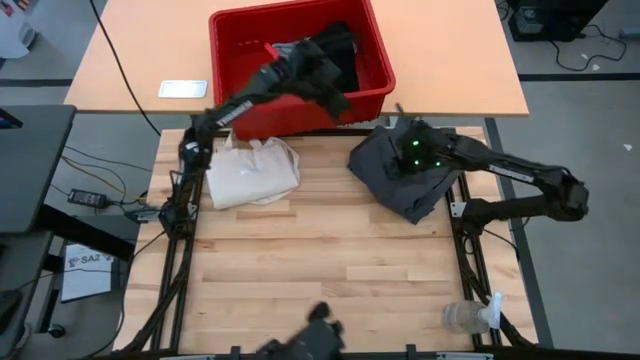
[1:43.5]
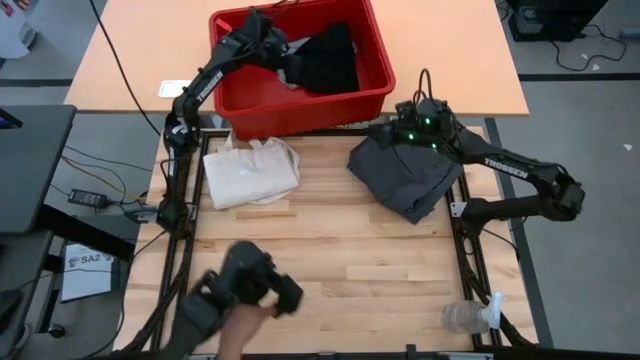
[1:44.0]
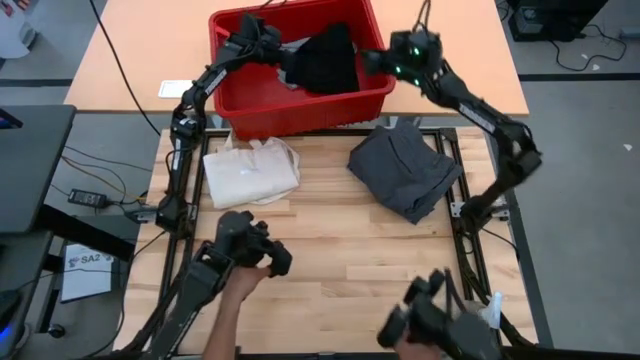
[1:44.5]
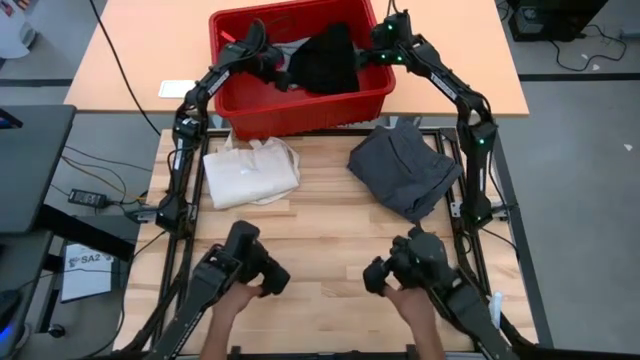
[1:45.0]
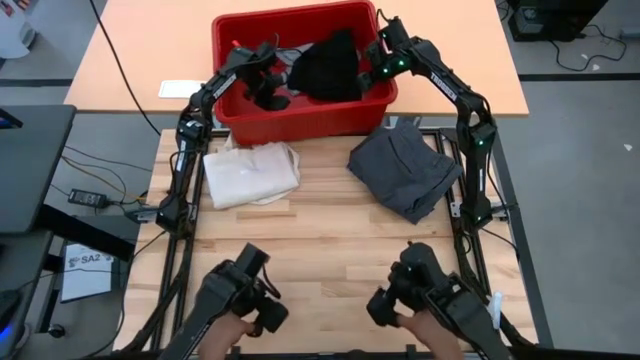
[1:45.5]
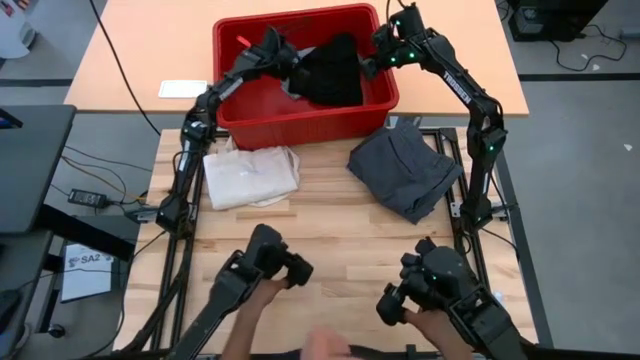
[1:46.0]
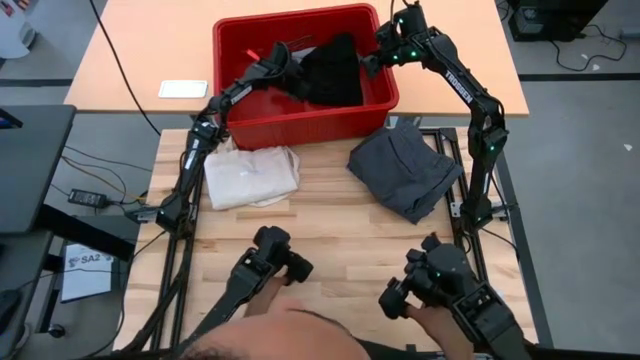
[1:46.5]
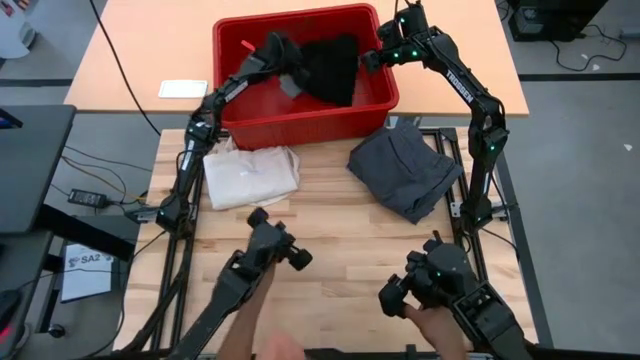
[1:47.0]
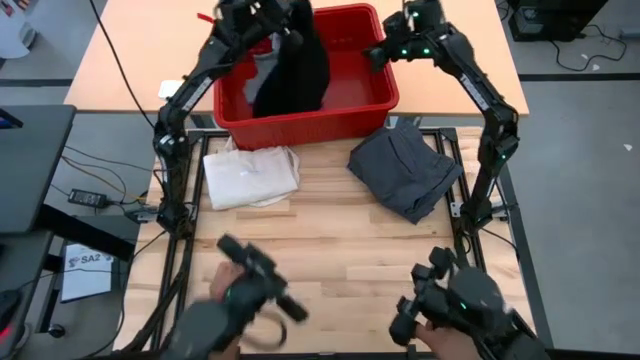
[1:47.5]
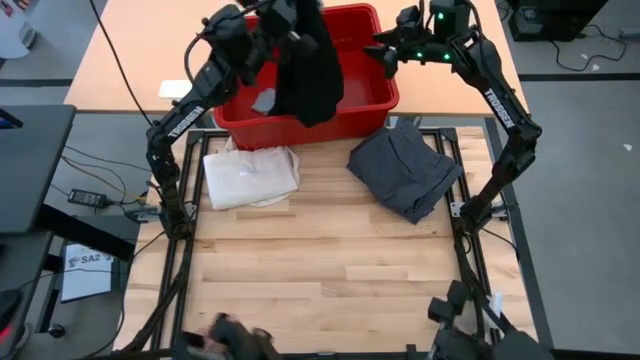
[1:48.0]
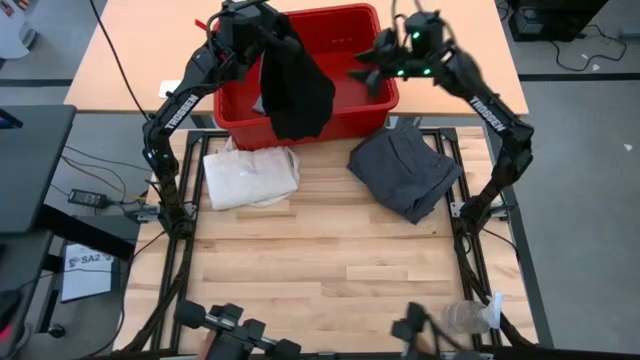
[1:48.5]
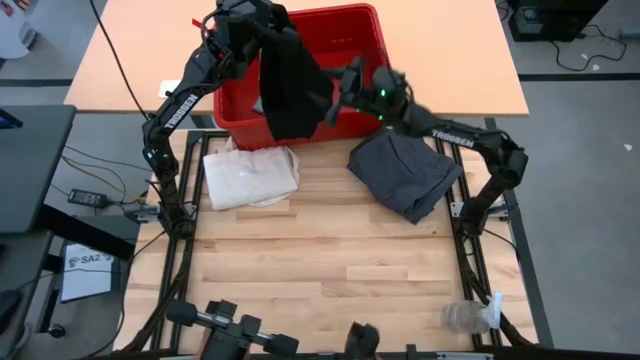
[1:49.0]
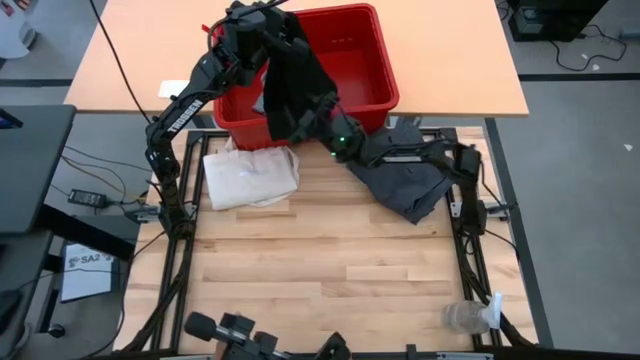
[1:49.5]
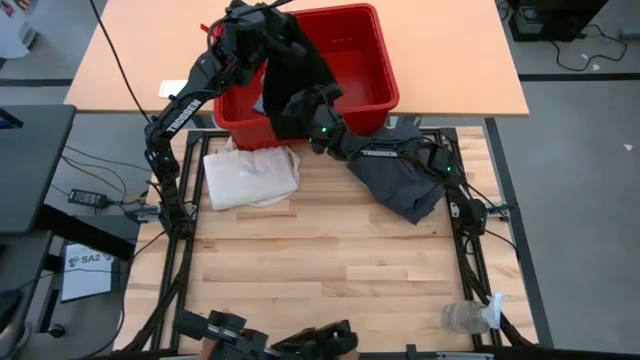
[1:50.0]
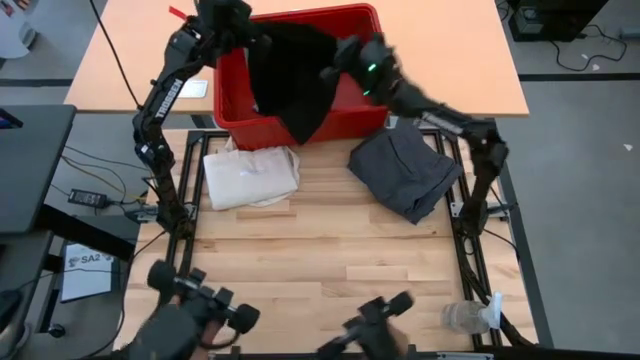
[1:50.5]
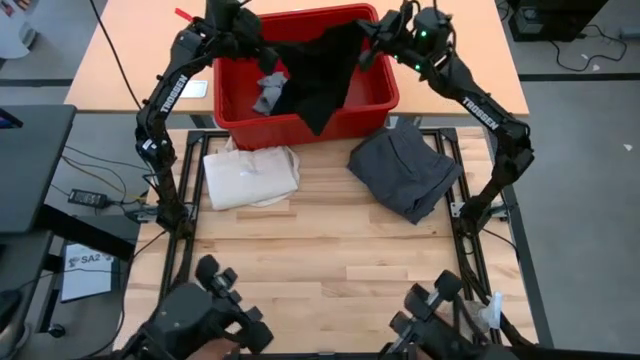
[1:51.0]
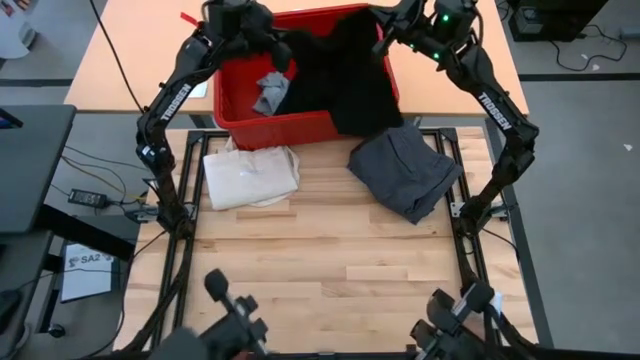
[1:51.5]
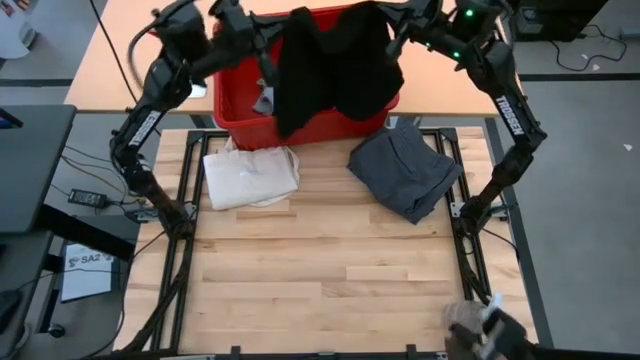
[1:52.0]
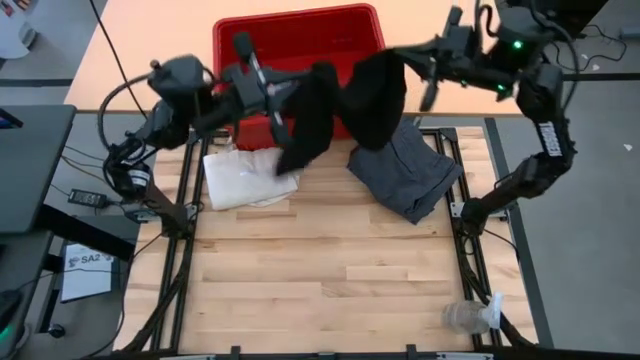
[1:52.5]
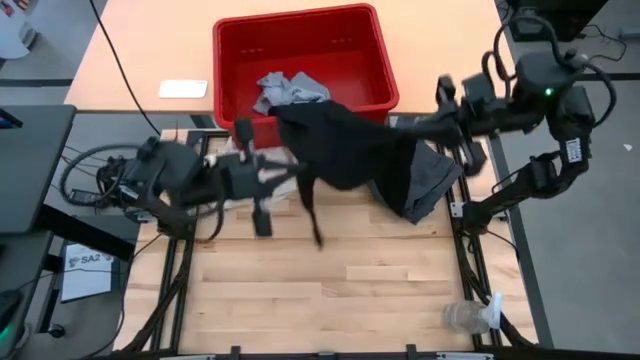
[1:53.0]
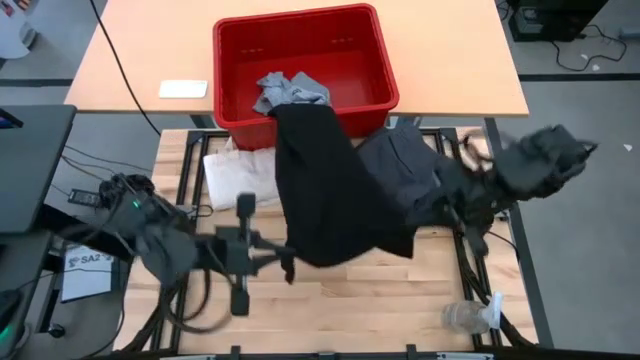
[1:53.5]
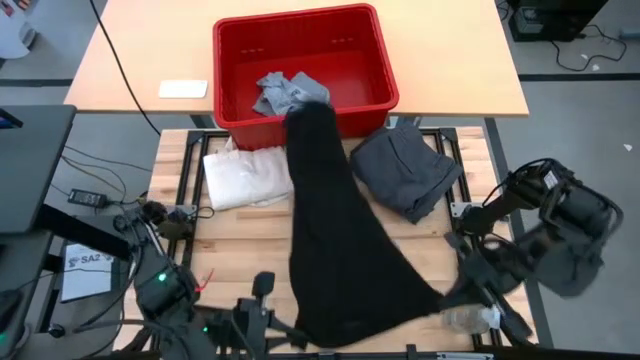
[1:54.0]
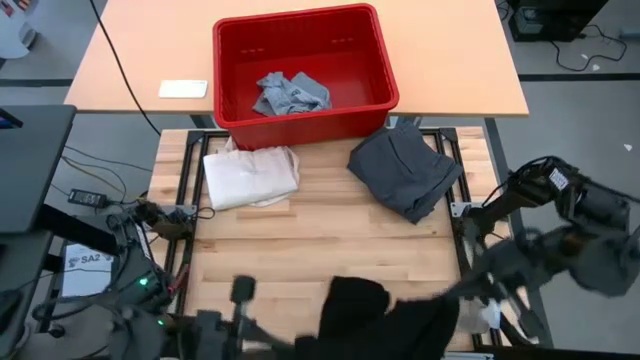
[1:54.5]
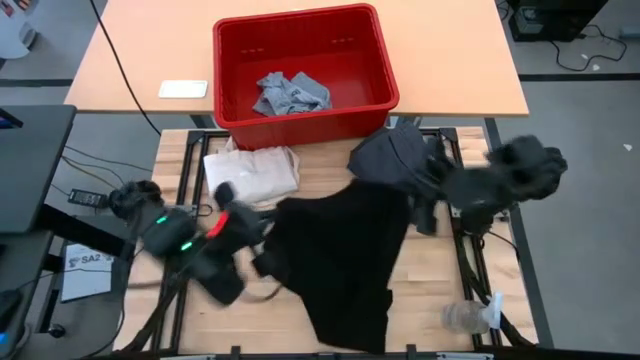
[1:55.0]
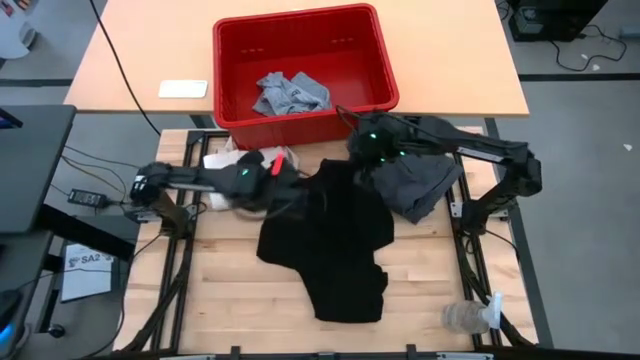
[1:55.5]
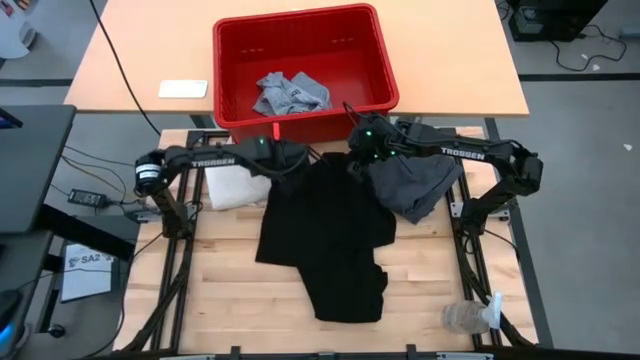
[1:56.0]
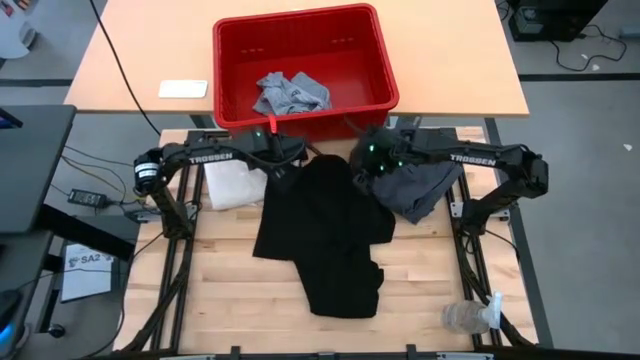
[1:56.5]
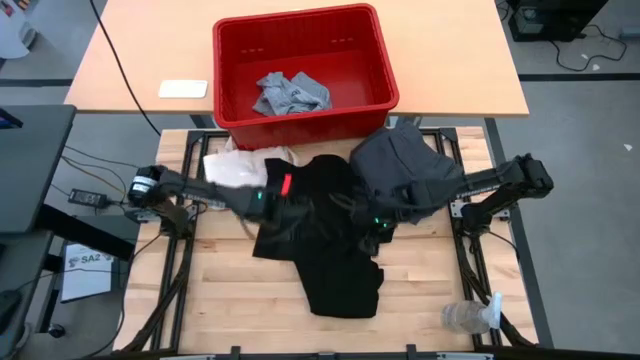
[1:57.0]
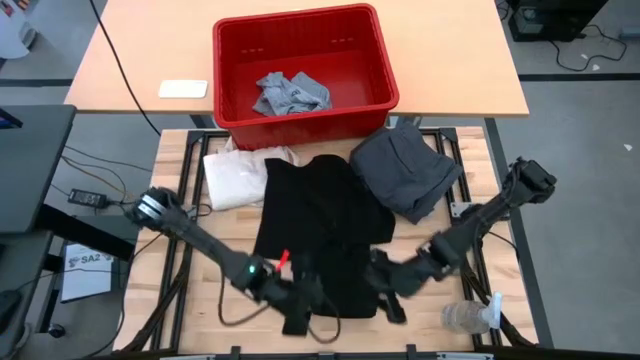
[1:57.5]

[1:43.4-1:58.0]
Task: Fold laundry
Fold the black shirt

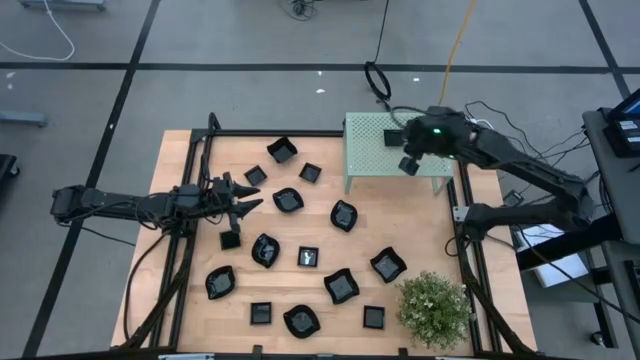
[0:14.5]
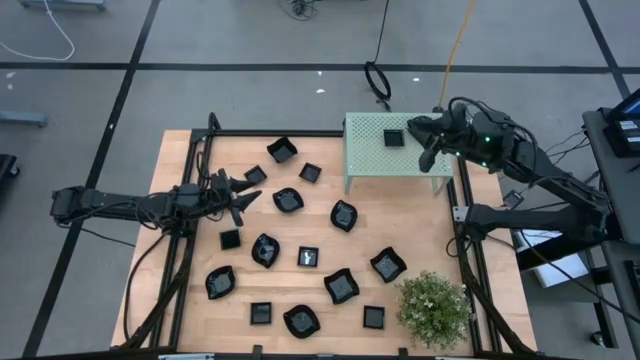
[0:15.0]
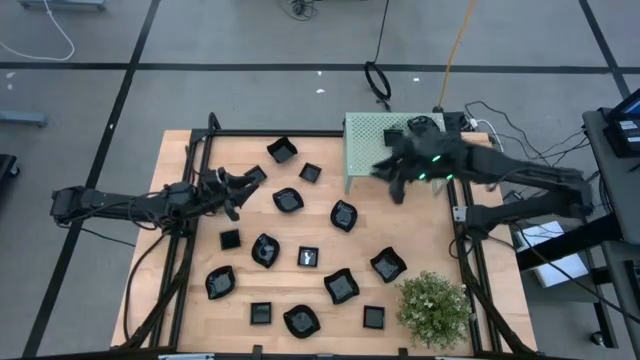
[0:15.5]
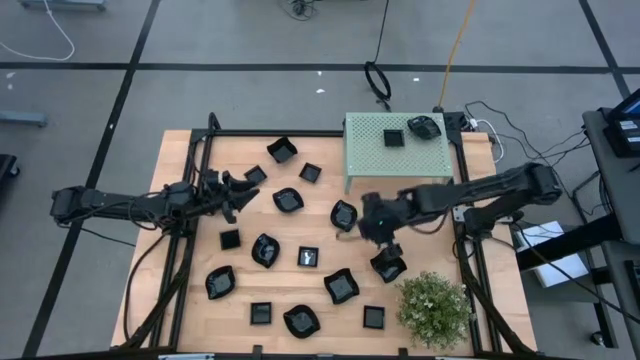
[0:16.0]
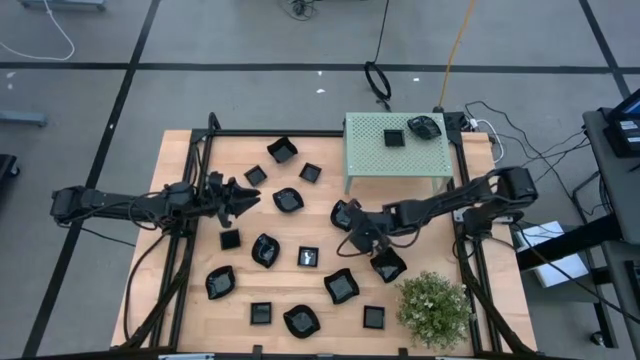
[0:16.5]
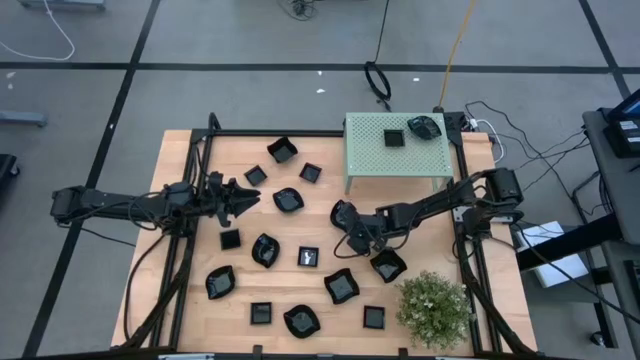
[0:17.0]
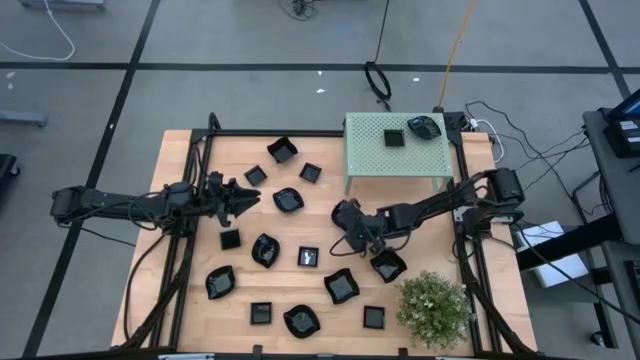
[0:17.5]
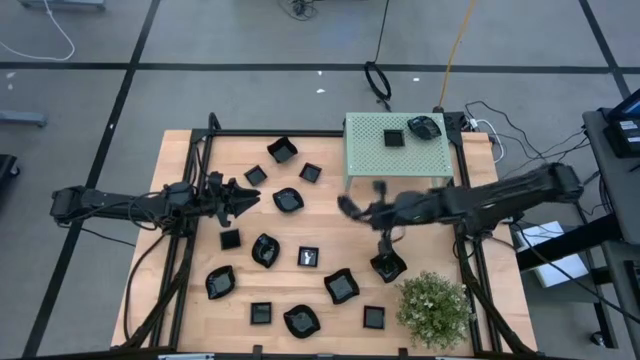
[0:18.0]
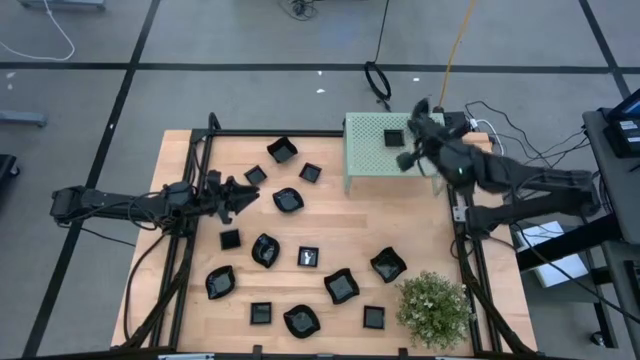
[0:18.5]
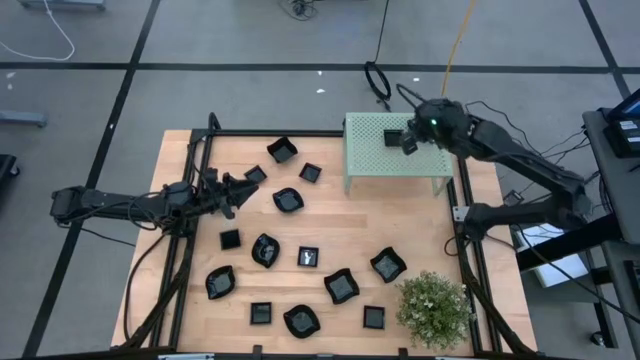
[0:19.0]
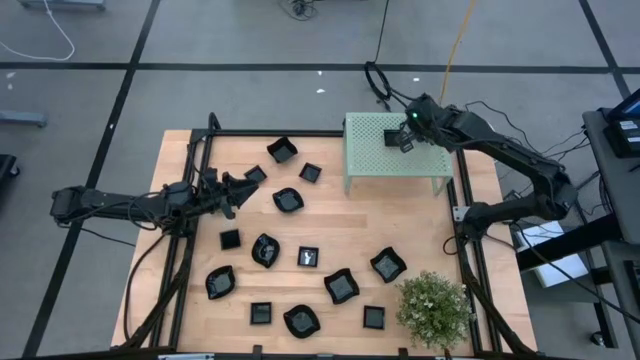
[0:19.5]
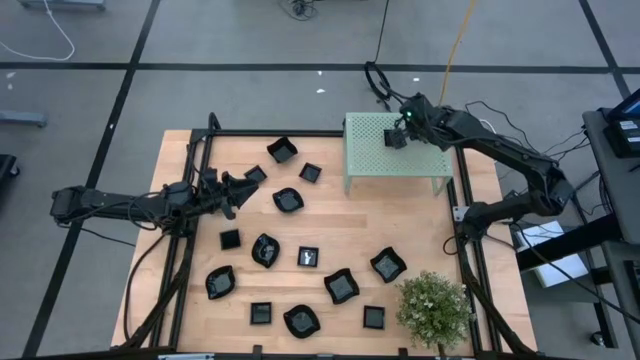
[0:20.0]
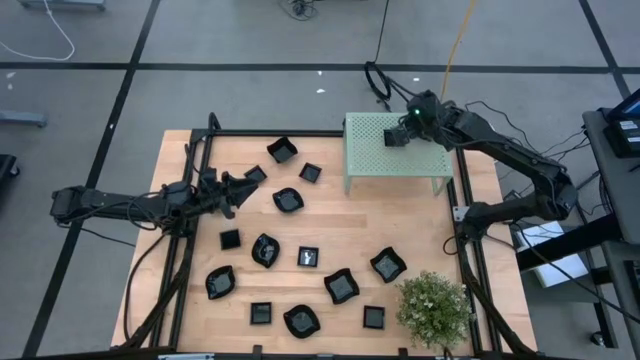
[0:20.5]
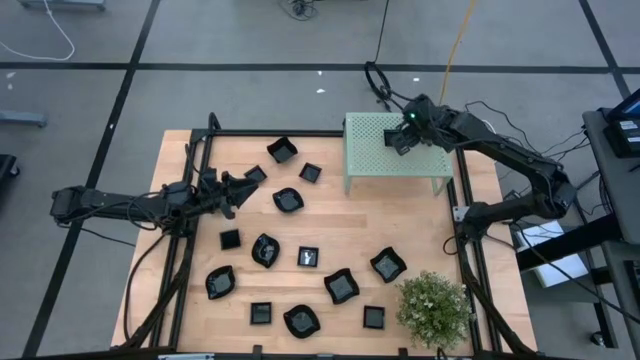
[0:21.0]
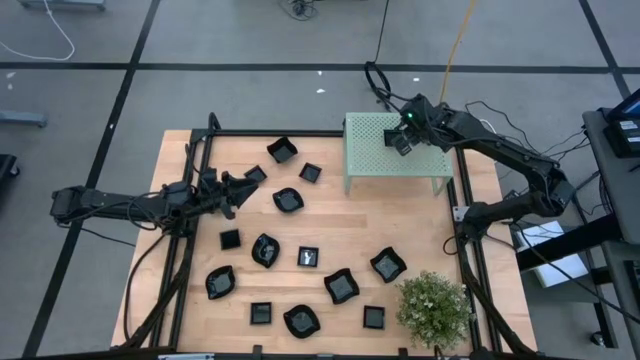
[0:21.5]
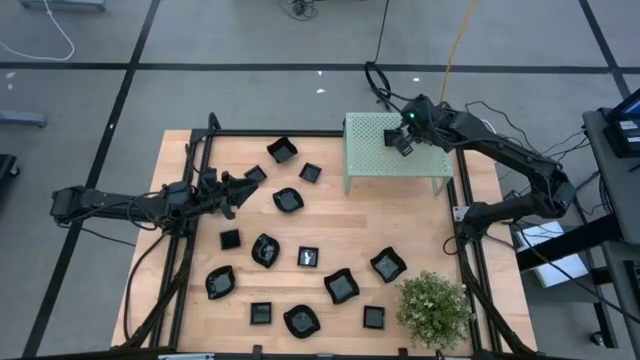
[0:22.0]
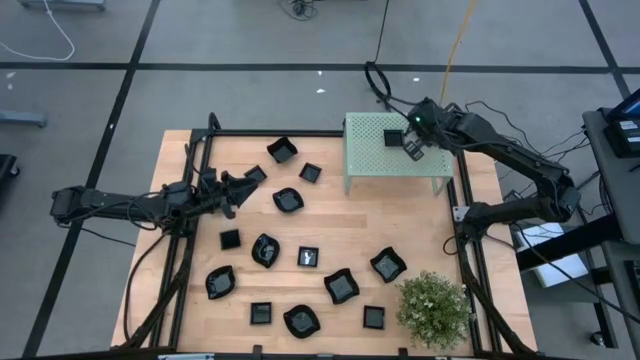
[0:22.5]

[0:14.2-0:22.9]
Task: Pick & Place Mini shaped plates
Stack the black leaf-shaped plate on top of the leaf-shaped plate on the shelf
